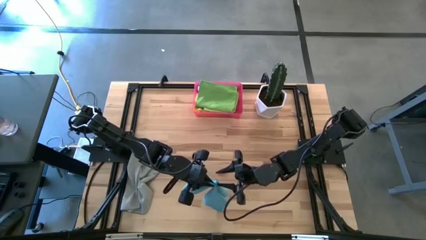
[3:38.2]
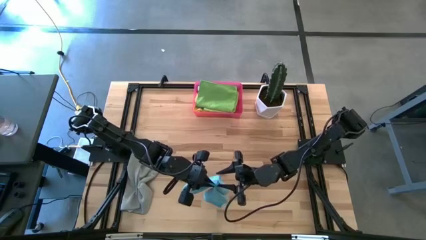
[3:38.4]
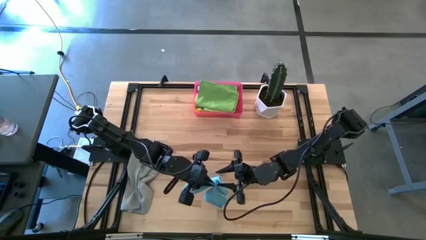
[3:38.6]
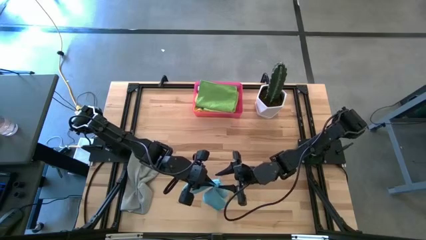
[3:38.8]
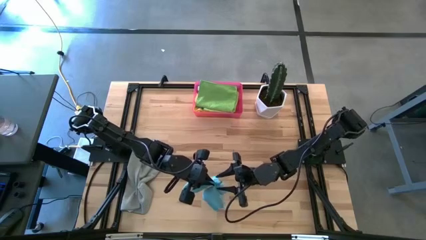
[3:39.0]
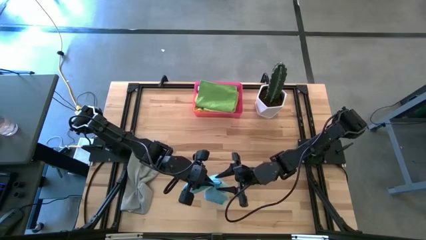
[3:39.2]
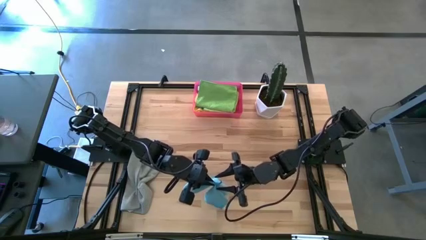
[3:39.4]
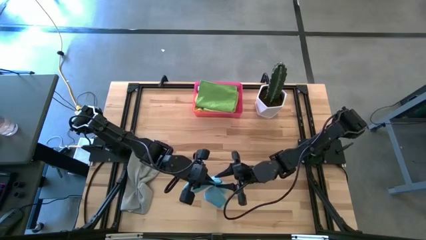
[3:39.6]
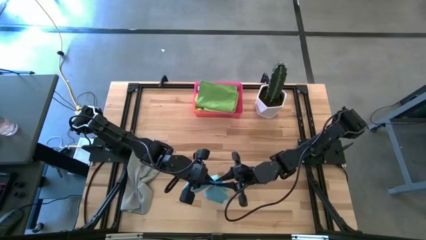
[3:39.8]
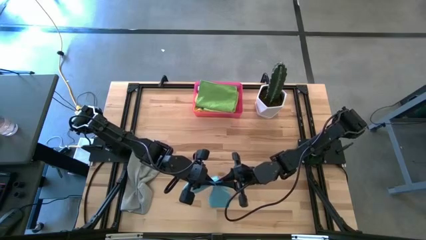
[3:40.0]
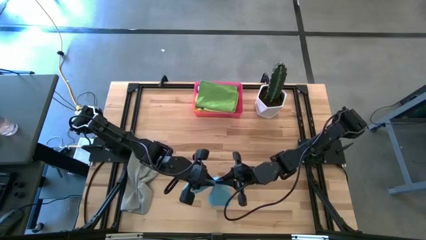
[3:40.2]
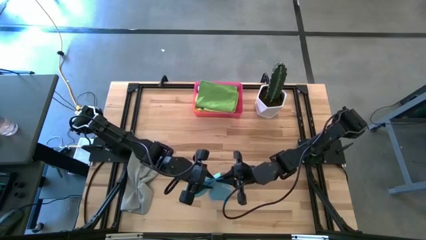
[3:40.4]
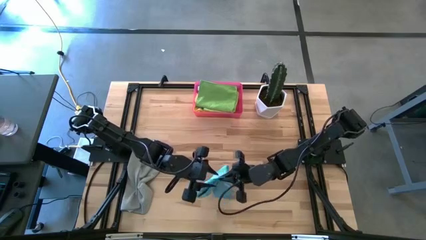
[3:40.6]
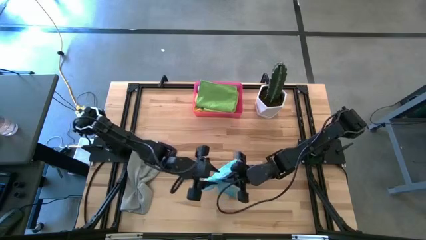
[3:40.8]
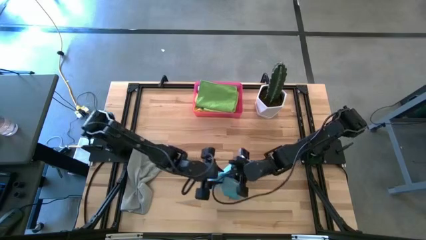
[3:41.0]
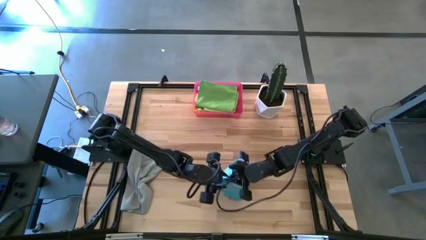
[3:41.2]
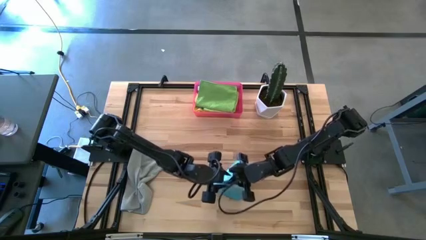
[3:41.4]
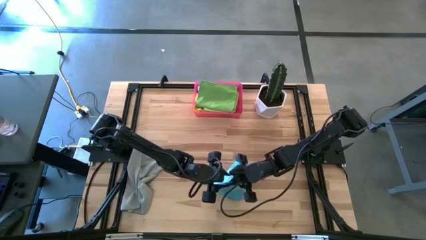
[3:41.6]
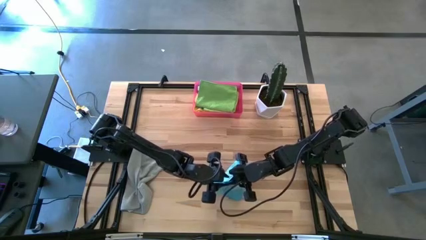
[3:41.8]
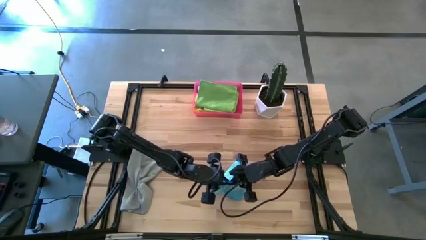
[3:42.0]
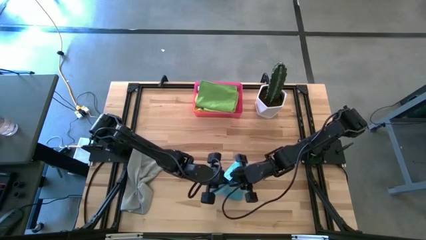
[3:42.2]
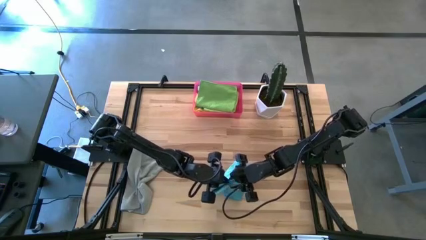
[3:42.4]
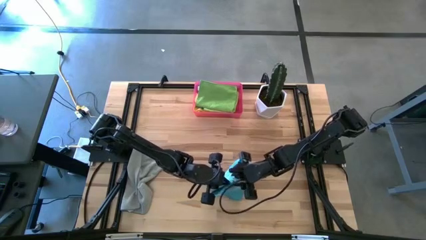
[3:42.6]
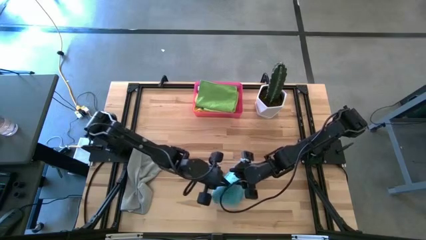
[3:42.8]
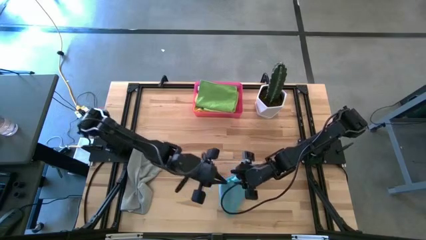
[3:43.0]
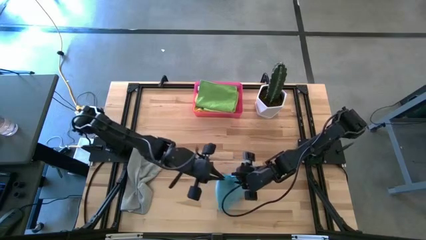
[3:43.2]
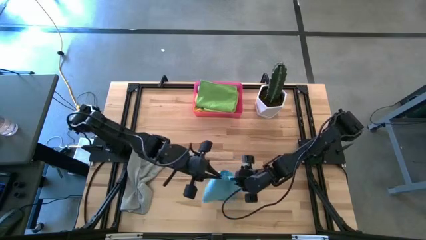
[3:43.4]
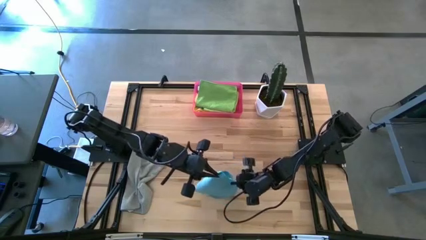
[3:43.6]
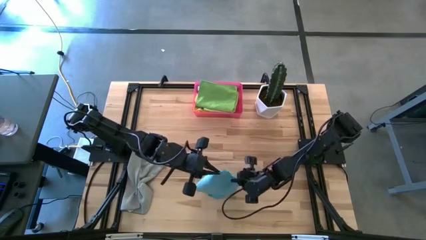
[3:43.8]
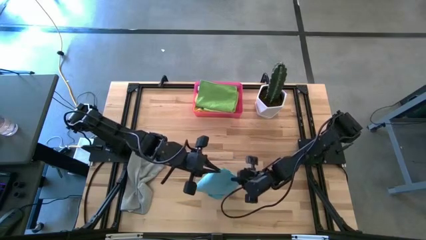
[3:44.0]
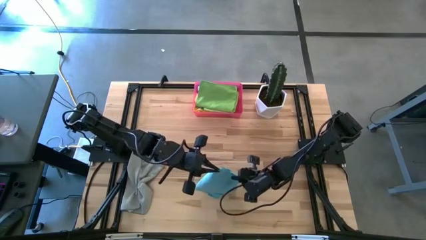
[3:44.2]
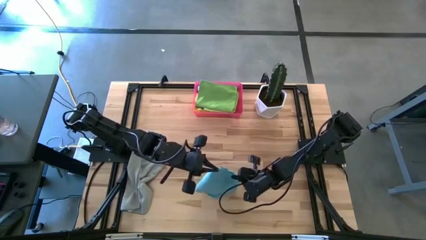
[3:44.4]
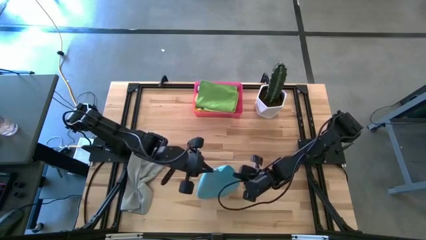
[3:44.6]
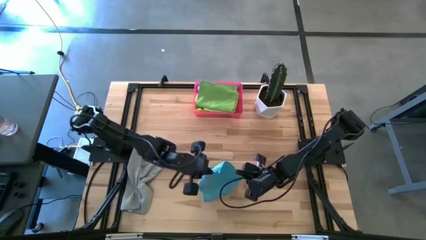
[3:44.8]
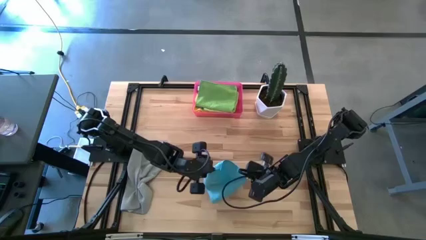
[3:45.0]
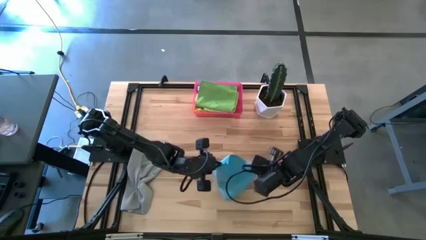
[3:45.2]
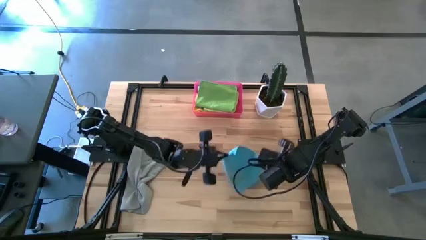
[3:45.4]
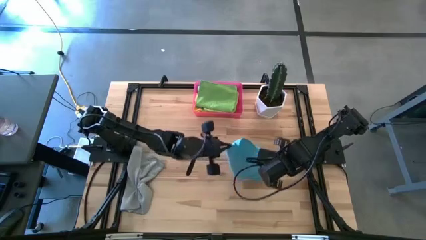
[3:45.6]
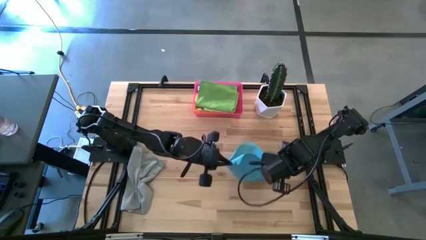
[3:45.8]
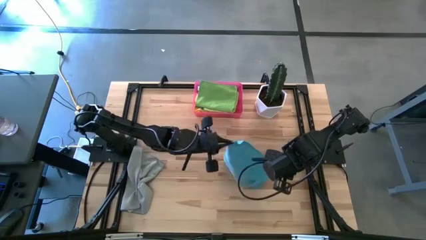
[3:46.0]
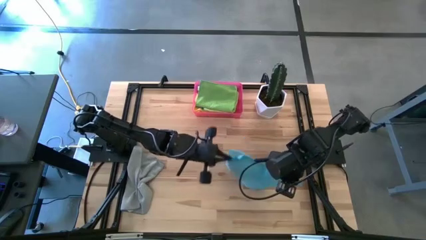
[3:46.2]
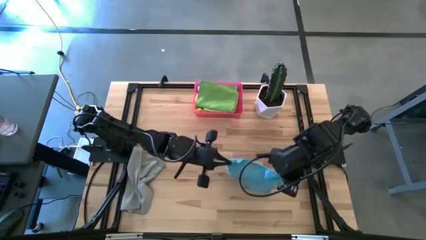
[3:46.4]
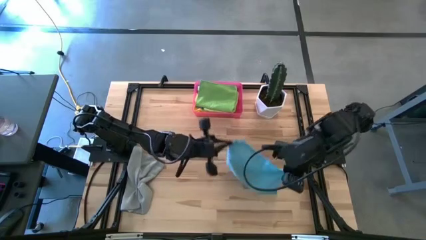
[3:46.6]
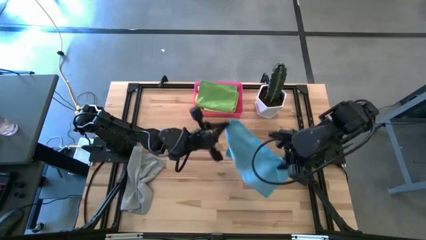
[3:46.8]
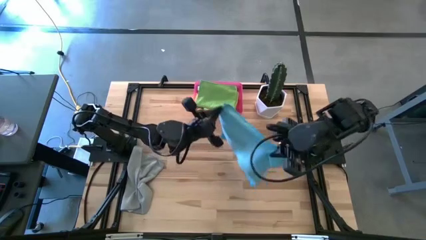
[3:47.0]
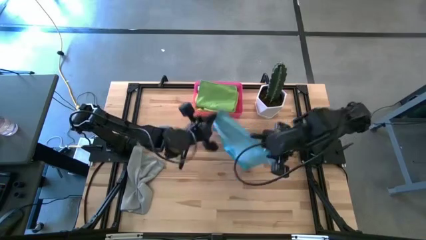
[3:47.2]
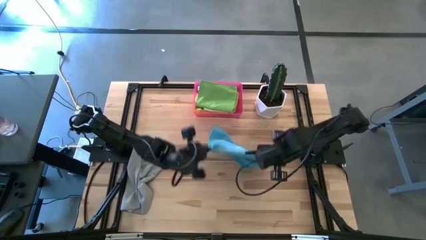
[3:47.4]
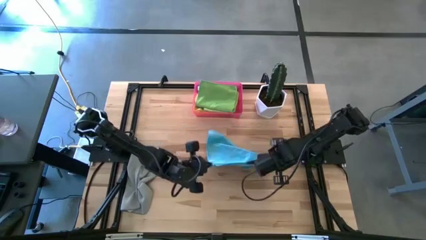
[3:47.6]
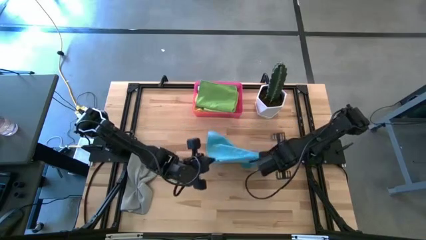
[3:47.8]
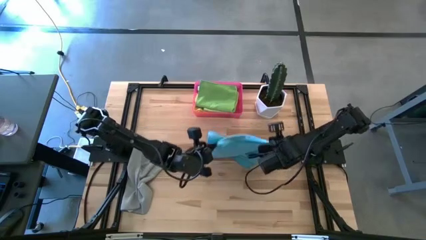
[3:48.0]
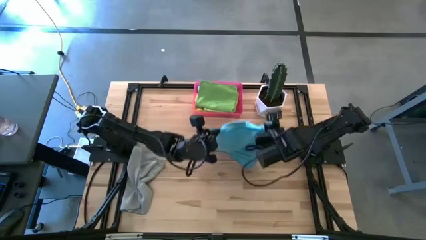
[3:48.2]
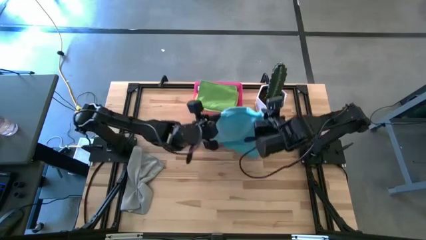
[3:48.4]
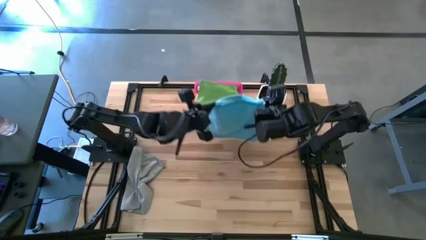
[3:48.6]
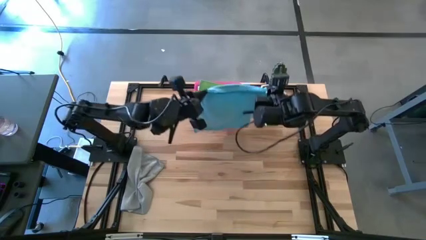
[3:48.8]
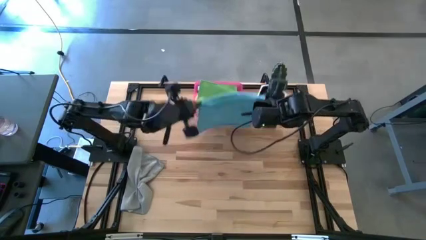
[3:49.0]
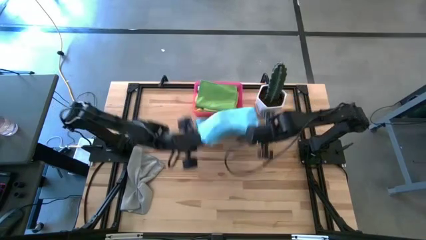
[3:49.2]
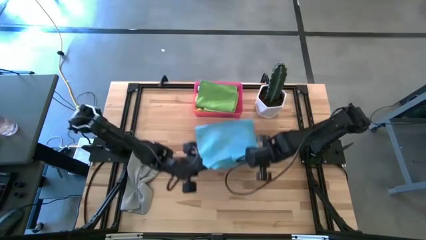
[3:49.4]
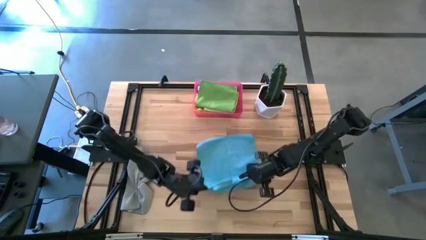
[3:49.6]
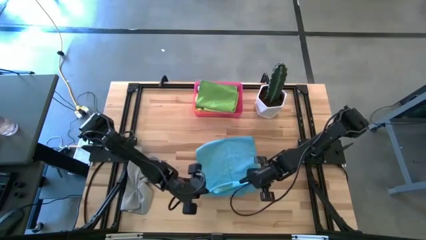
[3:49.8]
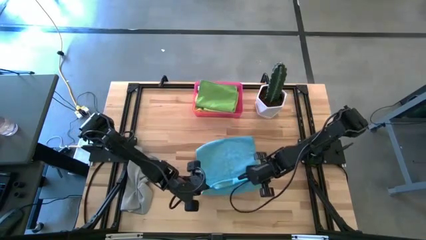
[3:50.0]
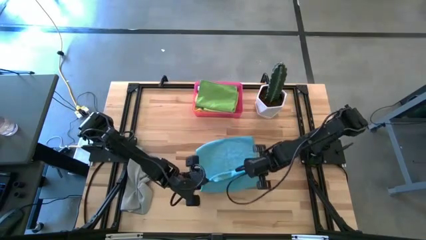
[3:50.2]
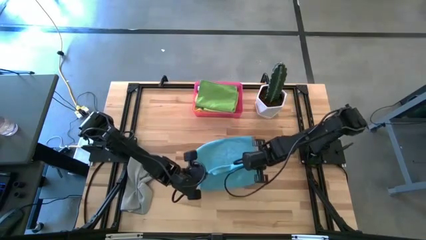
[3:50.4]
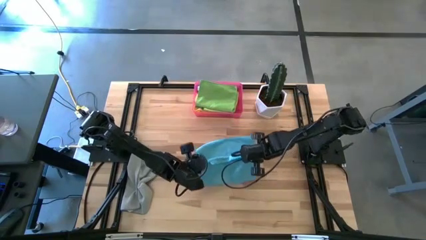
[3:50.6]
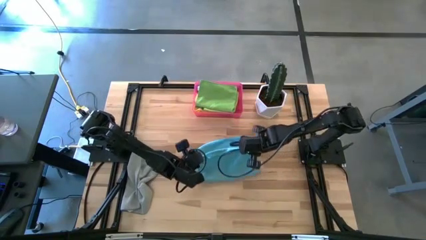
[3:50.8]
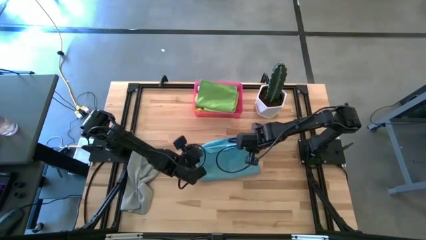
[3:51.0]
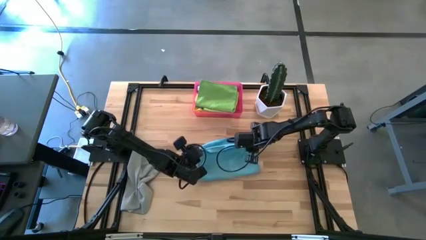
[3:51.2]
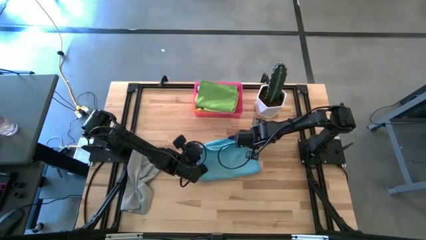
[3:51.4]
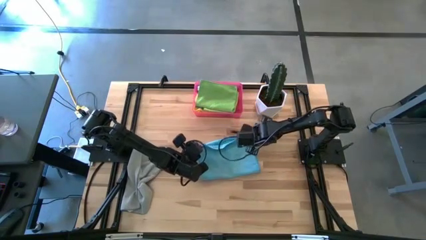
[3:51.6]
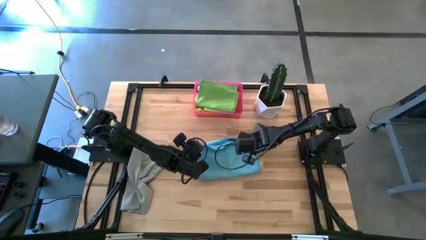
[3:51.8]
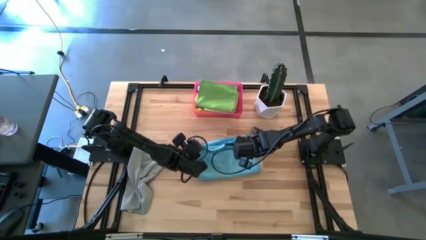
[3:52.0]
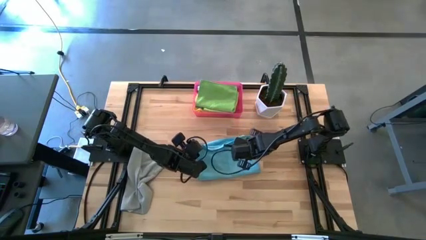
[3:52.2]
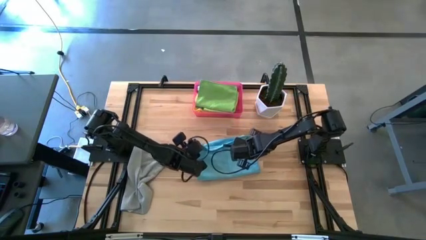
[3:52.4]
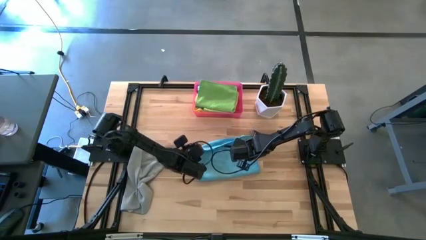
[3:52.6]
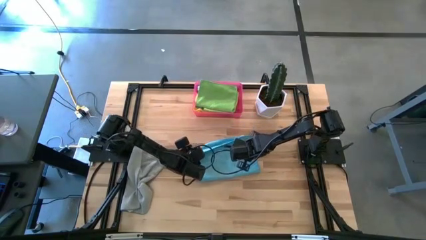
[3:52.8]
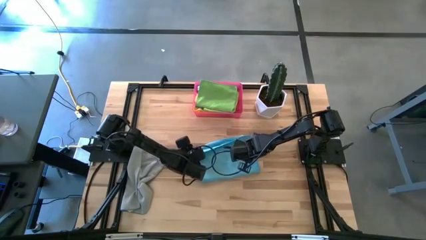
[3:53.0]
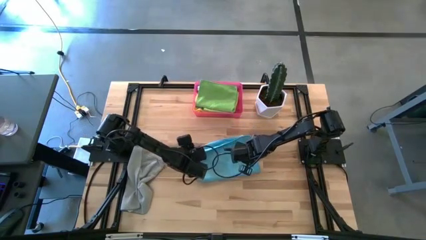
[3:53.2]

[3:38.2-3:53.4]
Task: Fold microfiber towels
Fold the blue microfiber cloth on the table

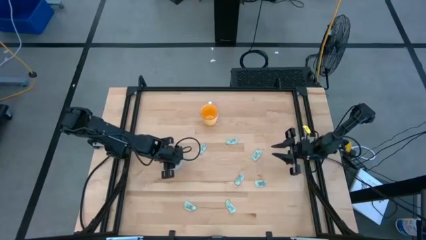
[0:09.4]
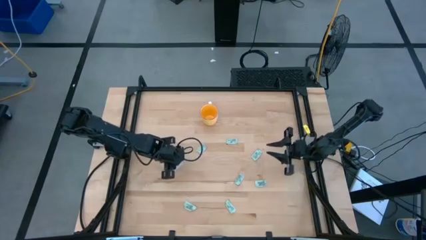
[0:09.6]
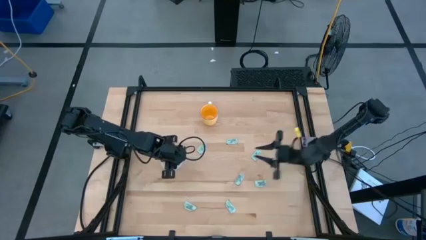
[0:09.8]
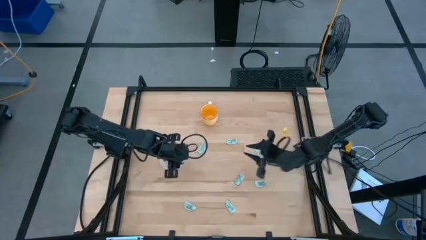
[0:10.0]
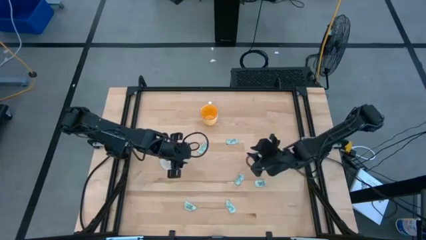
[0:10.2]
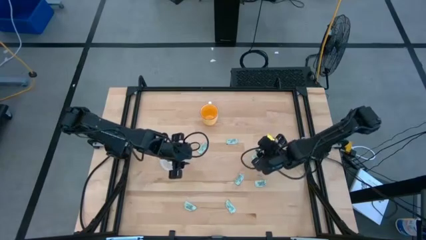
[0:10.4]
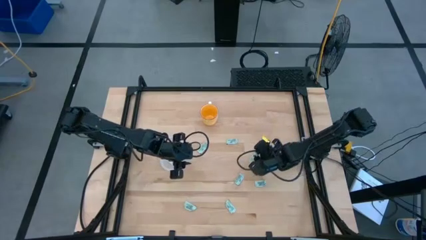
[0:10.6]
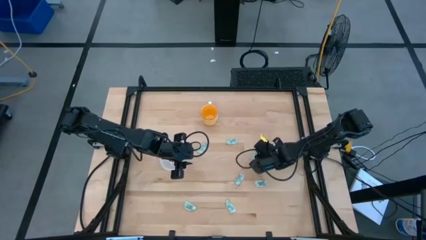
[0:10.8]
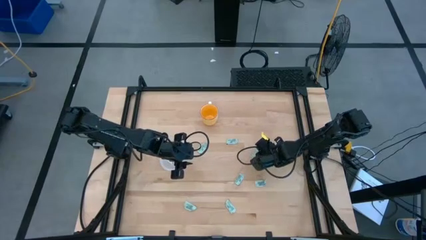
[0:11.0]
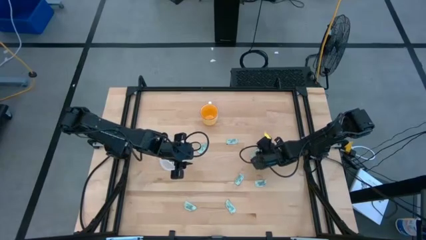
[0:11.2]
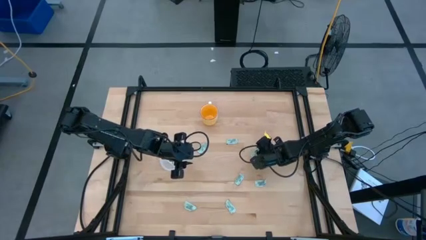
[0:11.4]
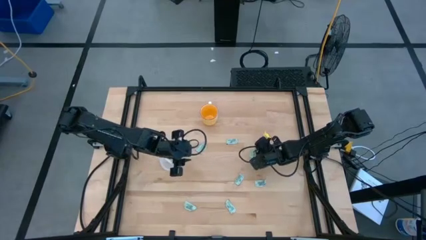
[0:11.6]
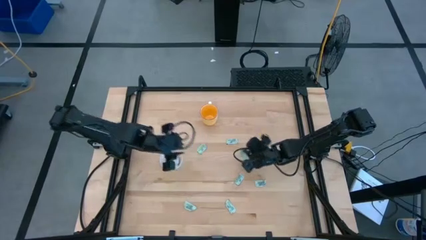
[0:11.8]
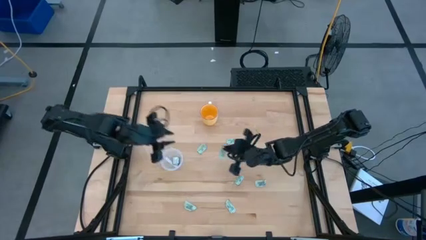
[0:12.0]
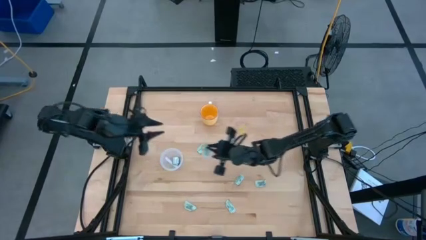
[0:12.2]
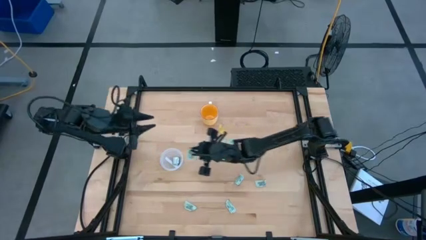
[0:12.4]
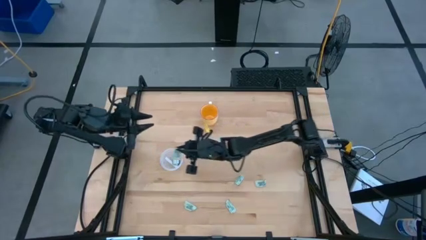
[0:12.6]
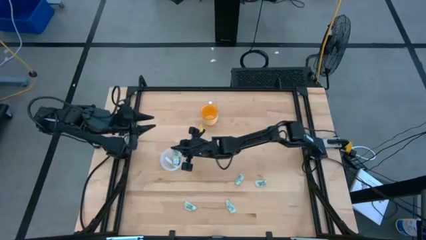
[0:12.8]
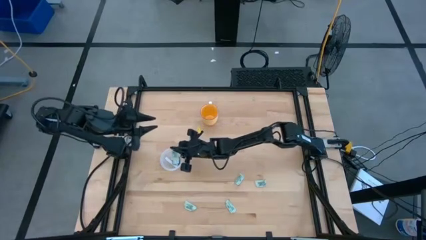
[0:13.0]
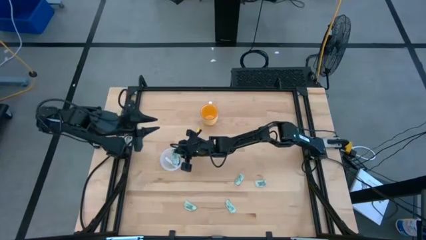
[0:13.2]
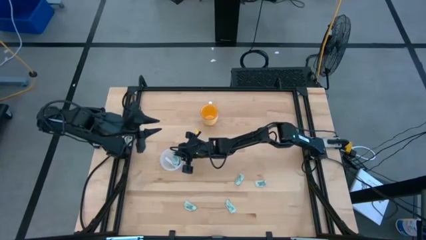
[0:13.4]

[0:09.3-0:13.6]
Task: Pick and place Stevia / Truvia into bins
Put the stevia packet into the container
